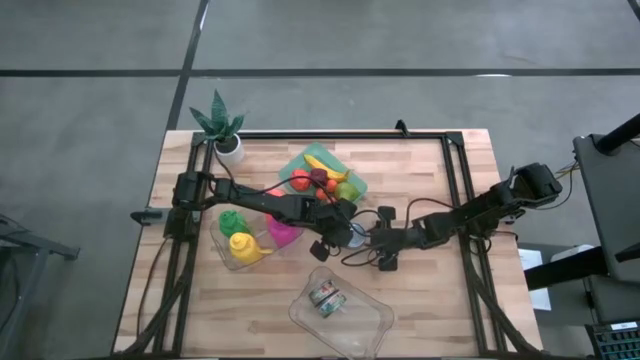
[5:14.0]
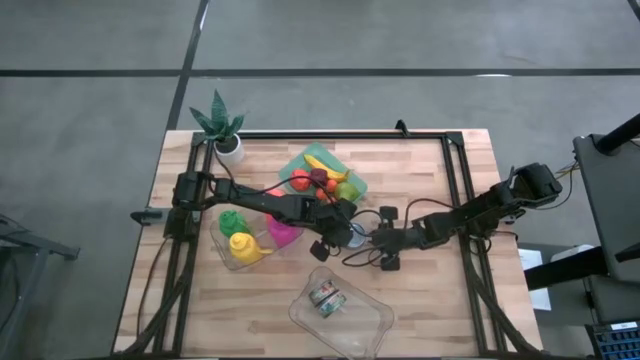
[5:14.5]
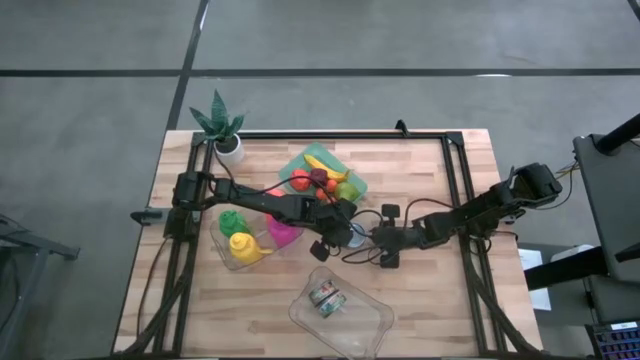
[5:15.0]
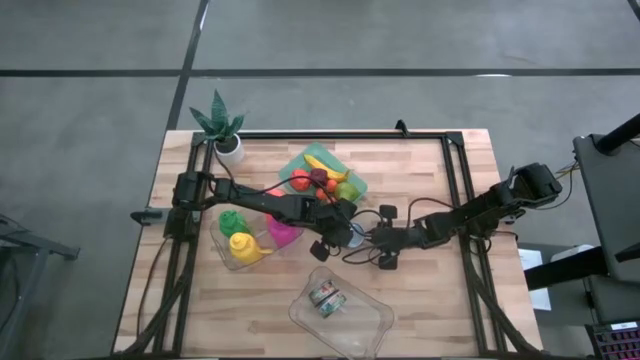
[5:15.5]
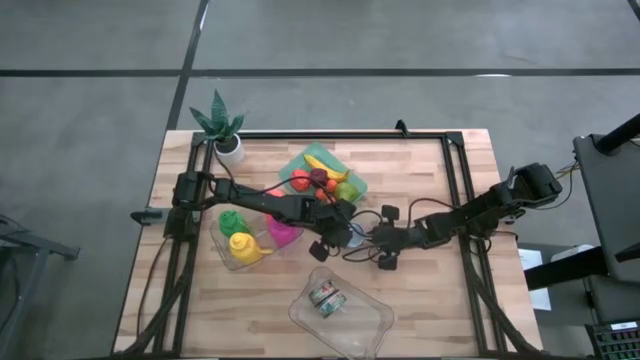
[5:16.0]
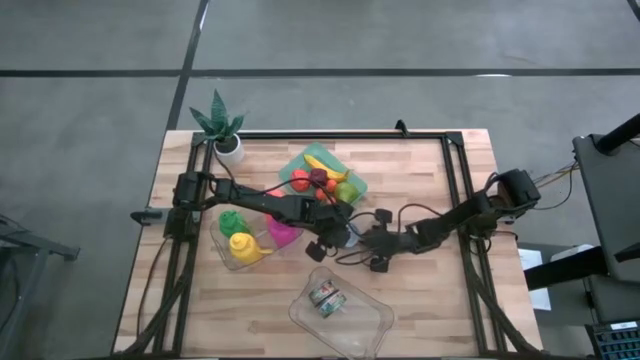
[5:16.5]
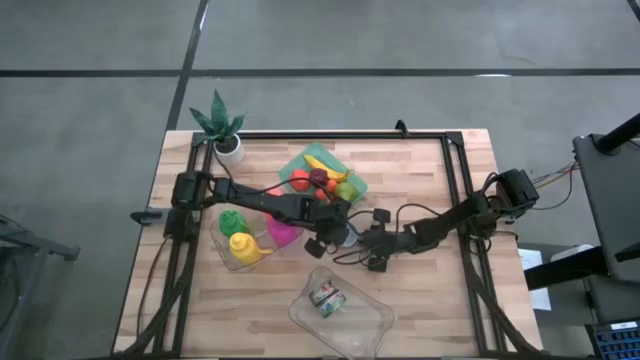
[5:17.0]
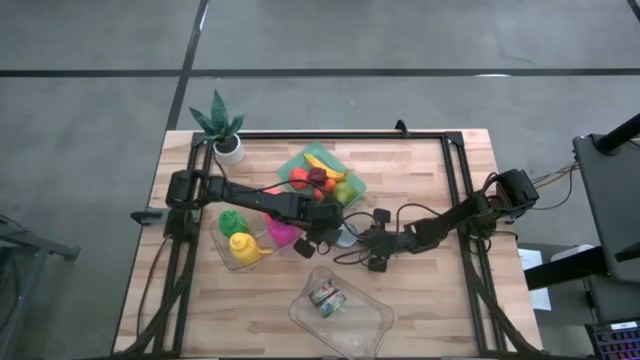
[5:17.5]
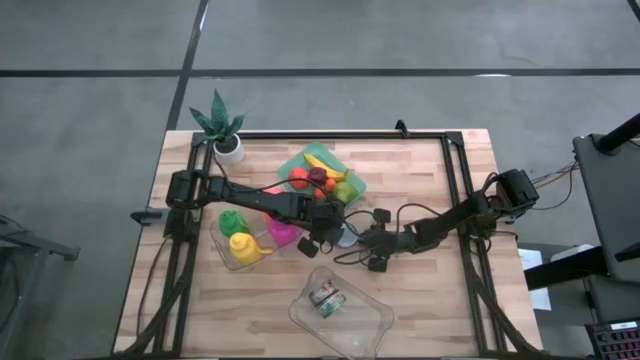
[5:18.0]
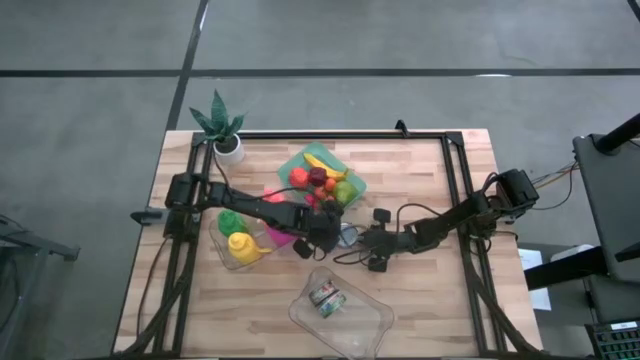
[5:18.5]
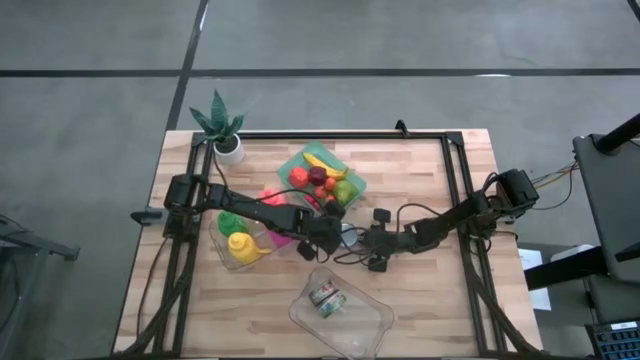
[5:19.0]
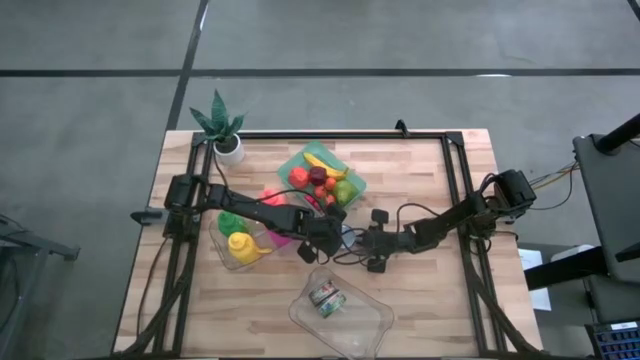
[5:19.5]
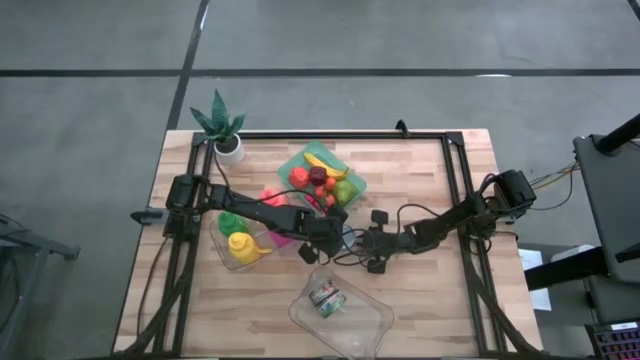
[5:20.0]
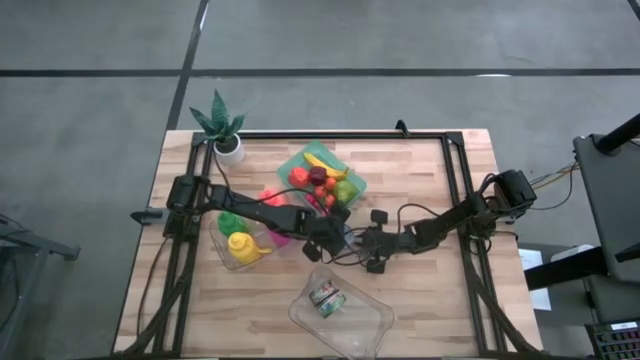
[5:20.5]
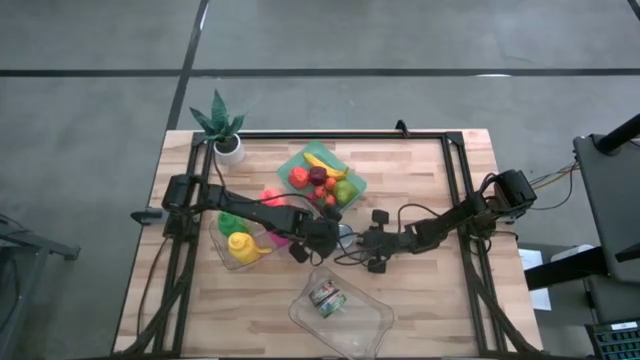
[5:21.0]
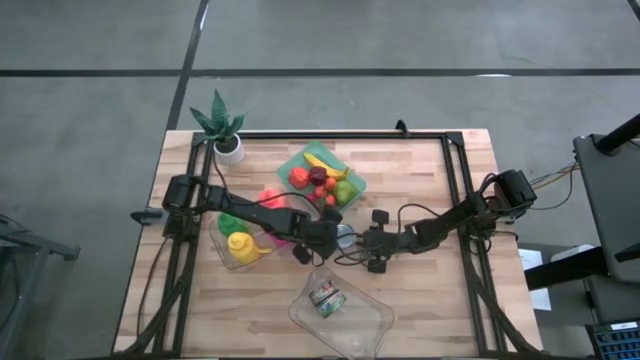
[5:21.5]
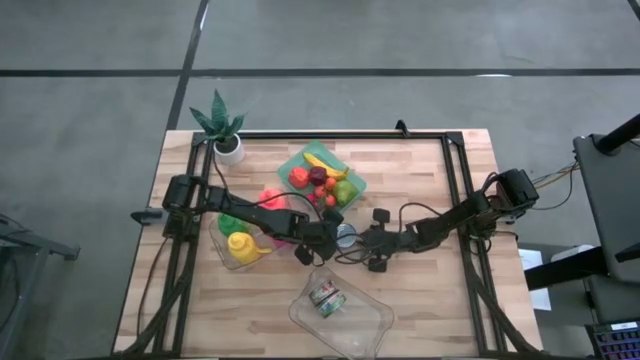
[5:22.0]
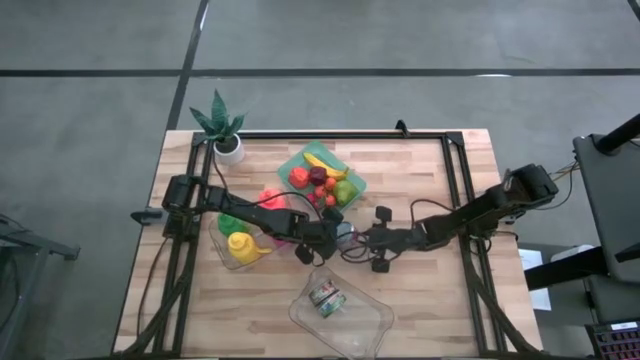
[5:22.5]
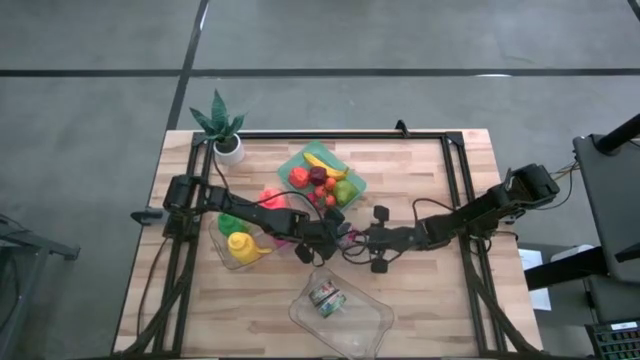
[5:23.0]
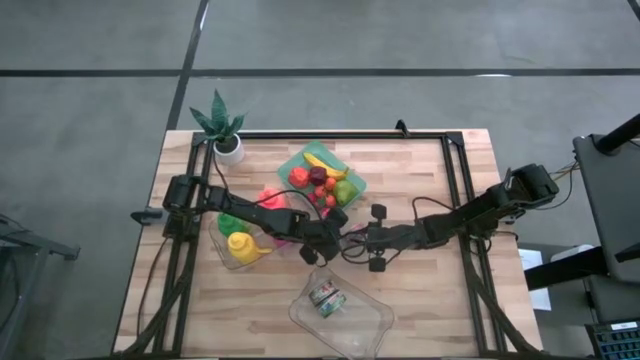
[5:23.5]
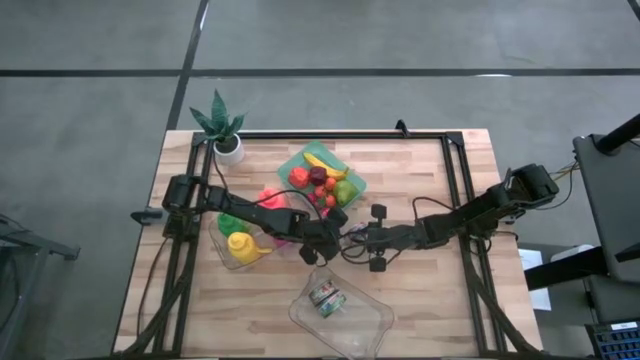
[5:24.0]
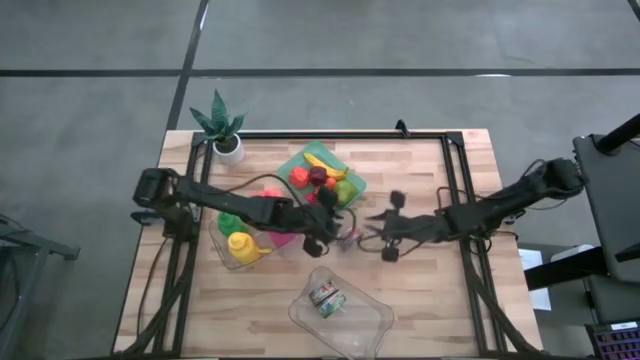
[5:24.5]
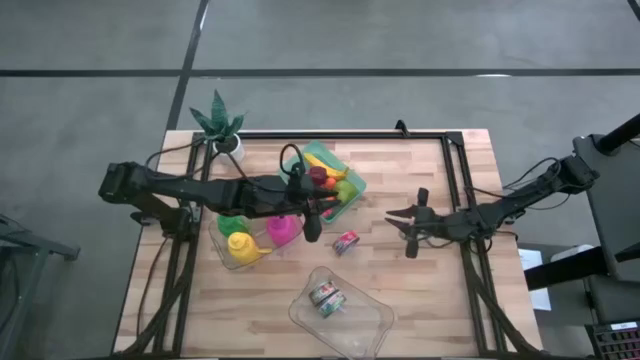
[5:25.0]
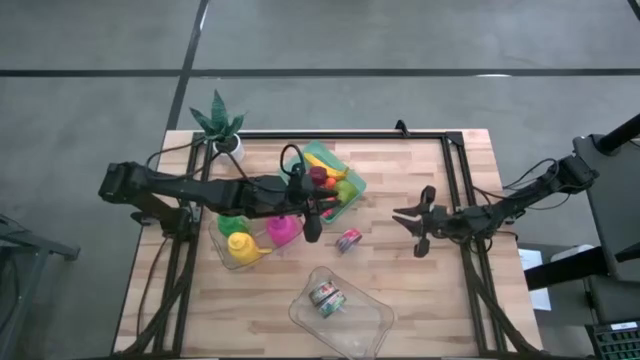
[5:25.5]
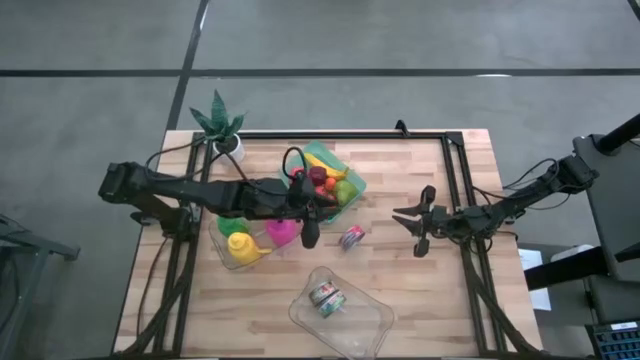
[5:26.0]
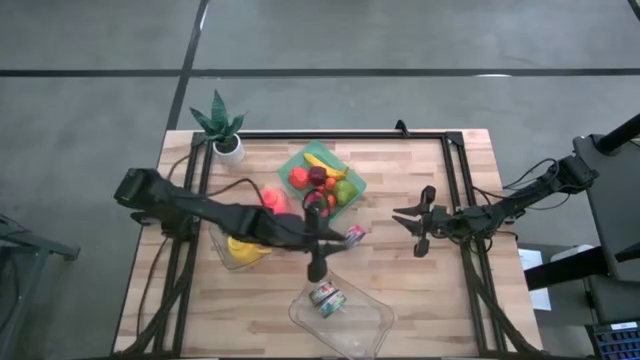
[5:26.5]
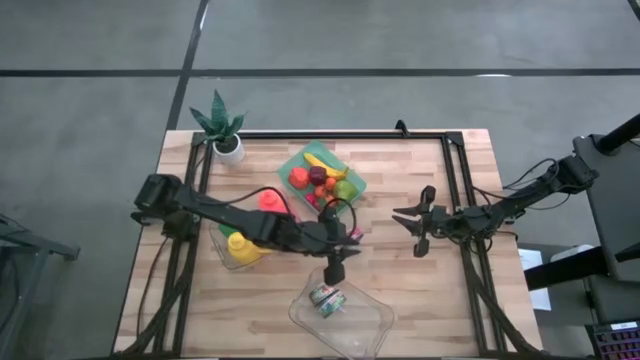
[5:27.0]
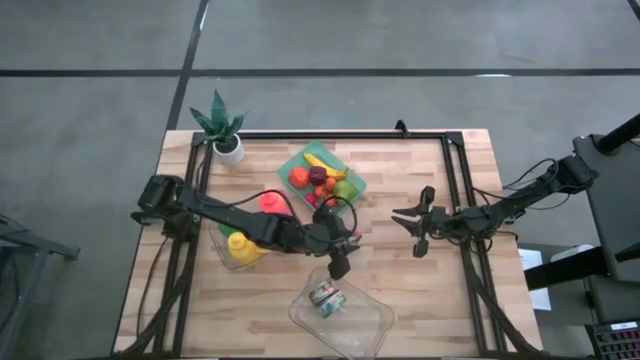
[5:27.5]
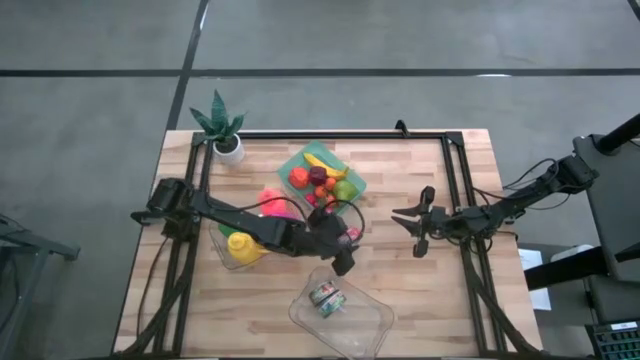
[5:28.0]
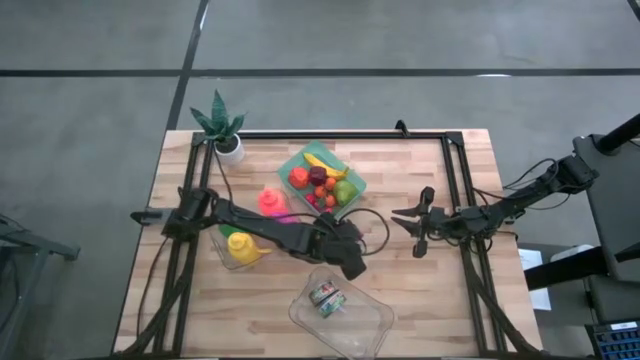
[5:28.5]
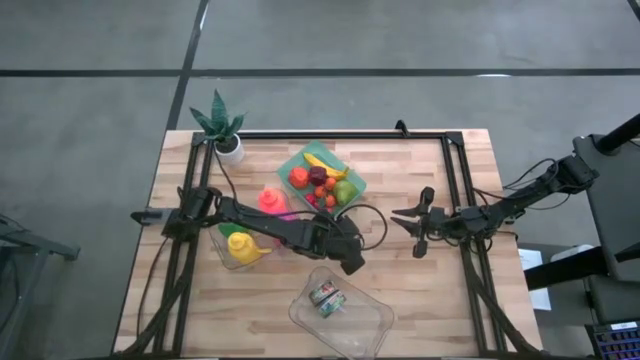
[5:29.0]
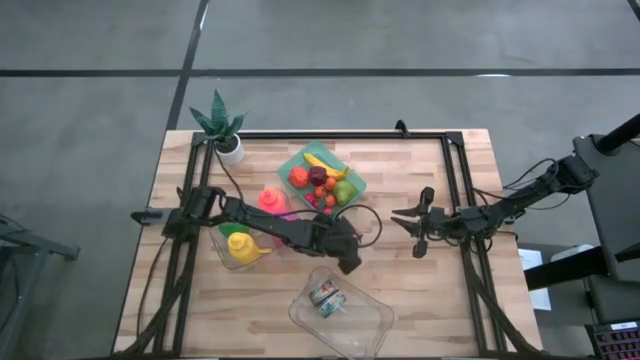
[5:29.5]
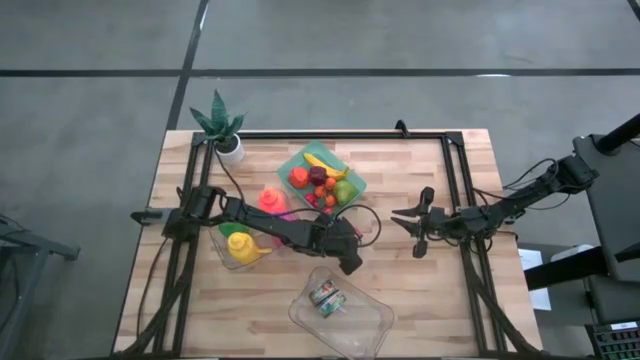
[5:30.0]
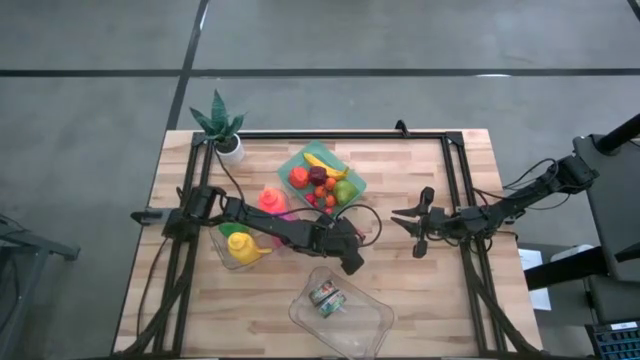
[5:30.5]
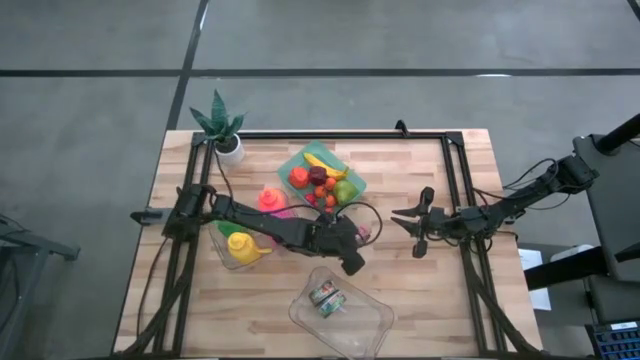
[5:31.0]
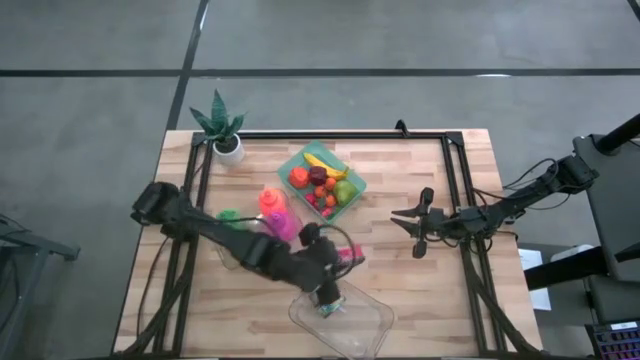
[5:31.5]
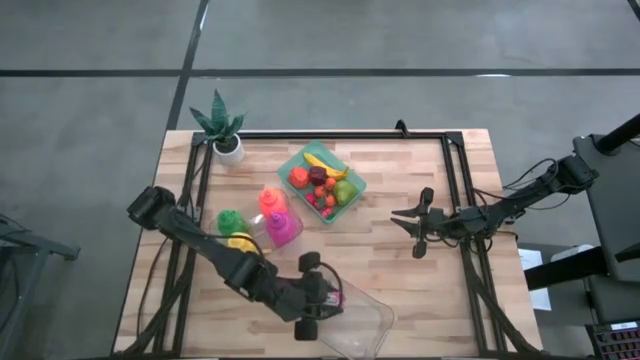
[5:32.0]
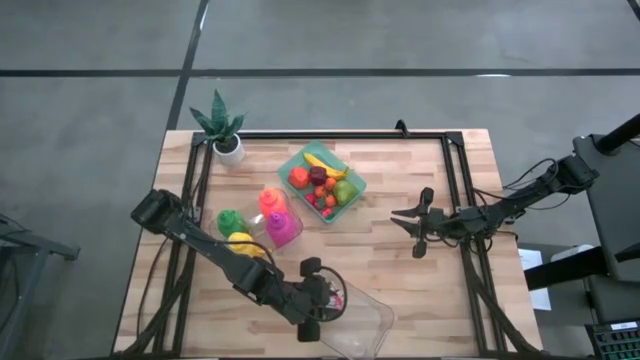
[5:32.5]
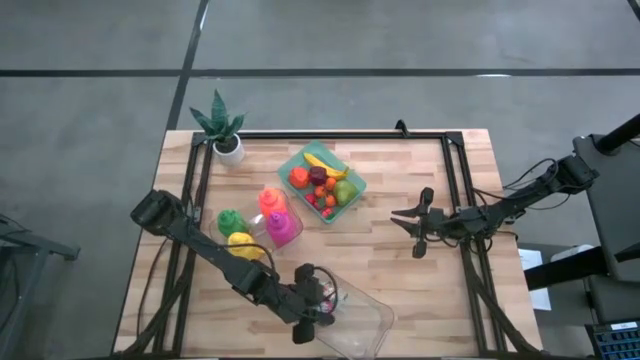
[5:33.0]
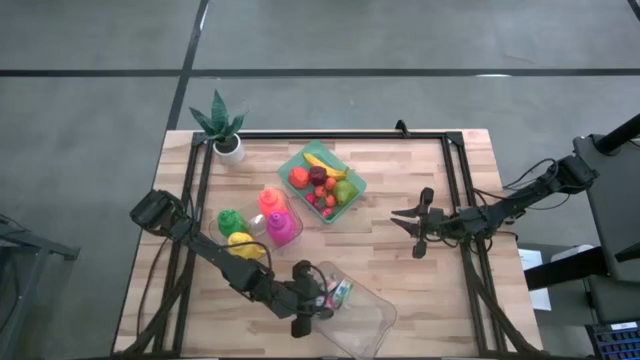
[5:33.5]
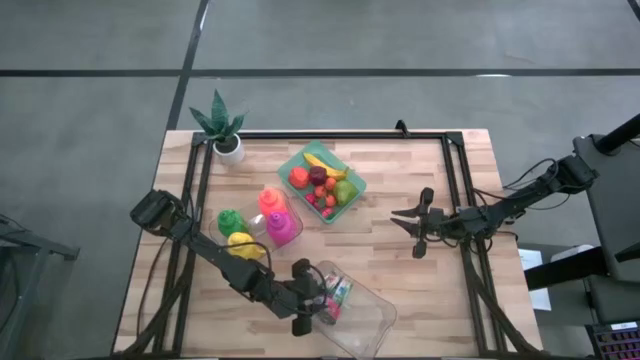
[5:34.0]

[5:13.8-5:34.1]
Task: Pick & Place Food Item
Put the red tuna can into the bottom transparent bin

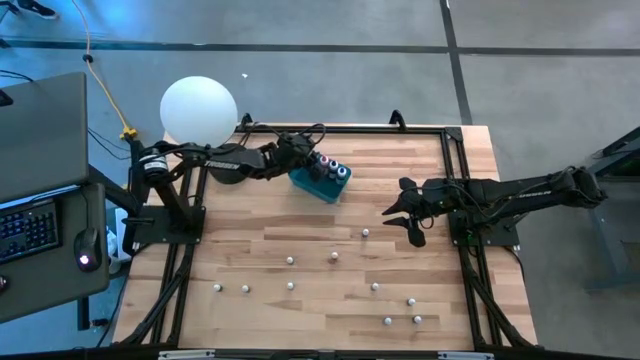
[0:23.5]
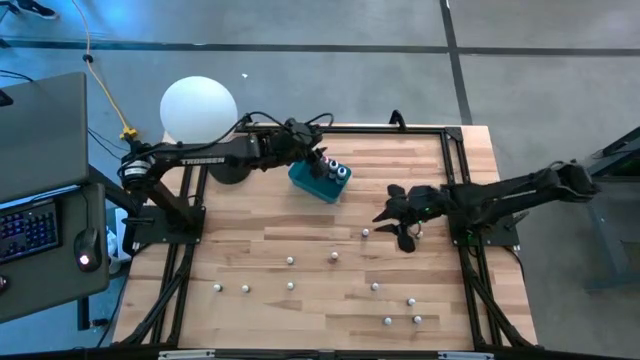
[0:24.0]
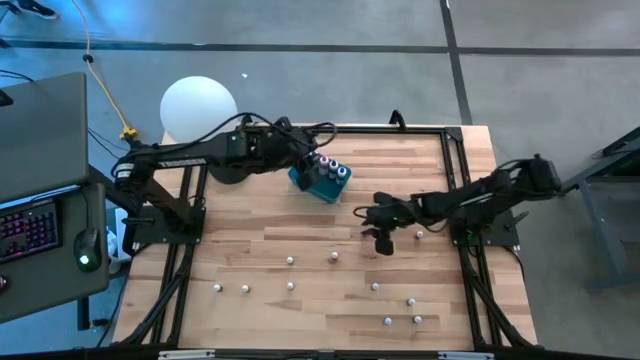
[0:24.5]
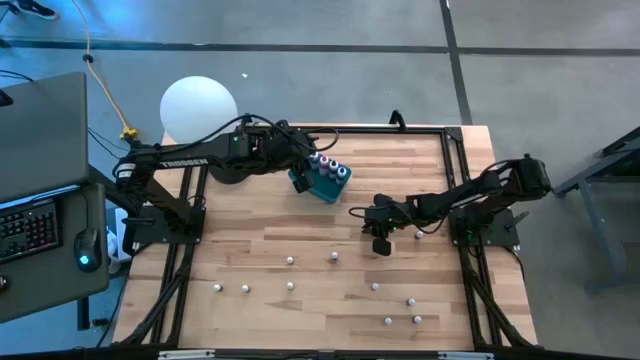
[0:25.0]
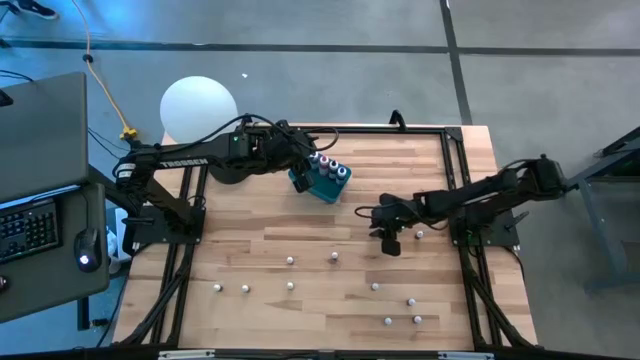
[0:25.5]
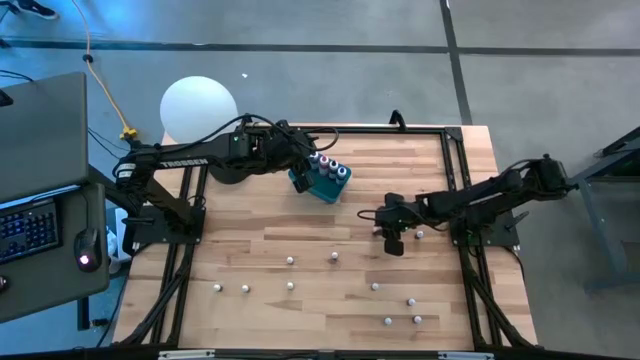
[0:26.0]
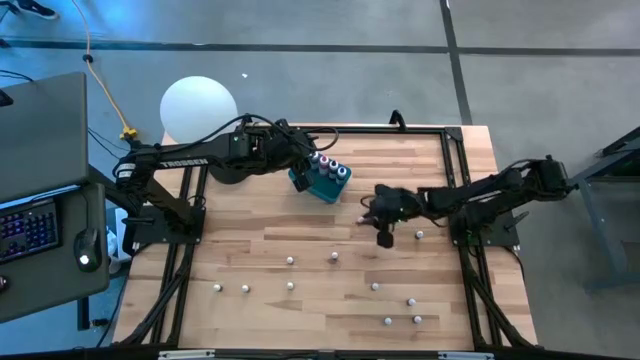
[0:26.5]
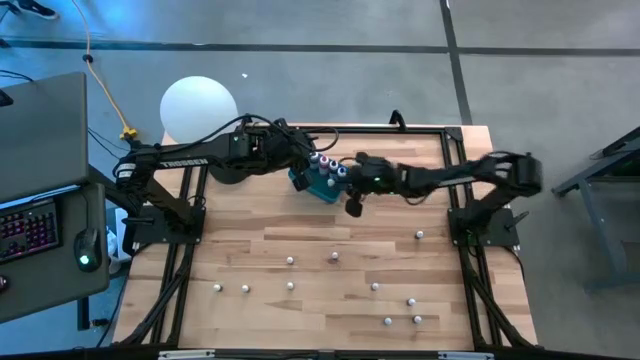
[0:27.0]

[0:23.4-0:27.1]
Task: Pick & Place food coloring
Put the green food coloring bottle into the blue bin
